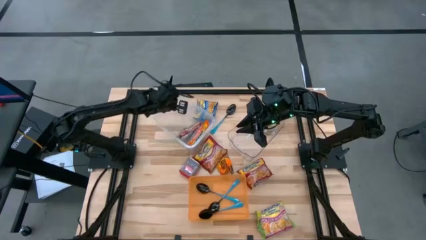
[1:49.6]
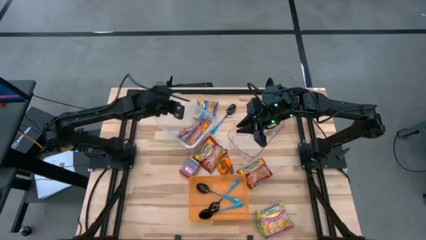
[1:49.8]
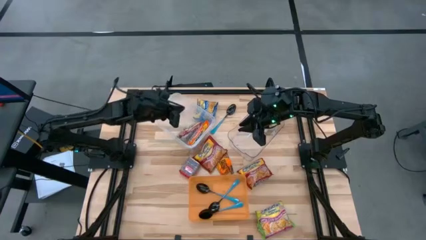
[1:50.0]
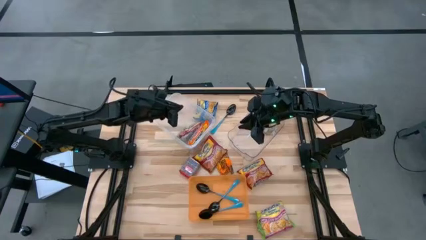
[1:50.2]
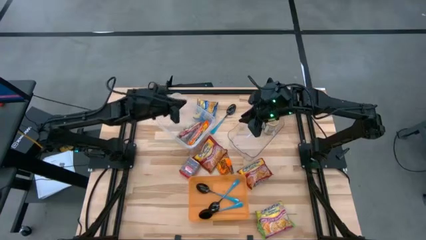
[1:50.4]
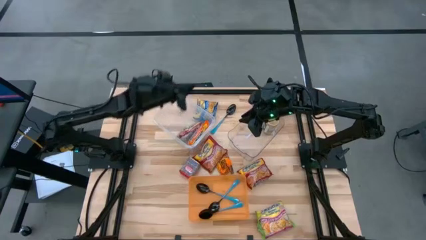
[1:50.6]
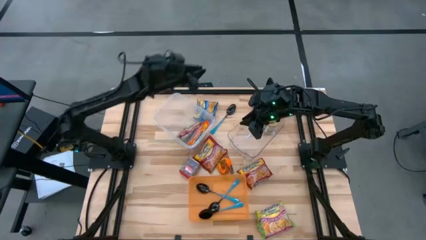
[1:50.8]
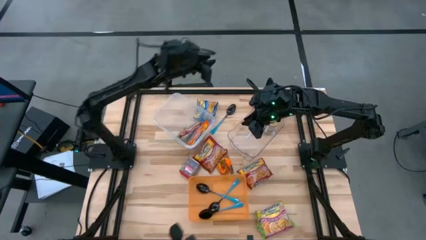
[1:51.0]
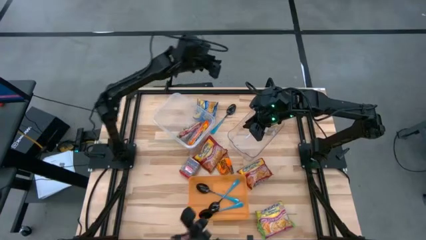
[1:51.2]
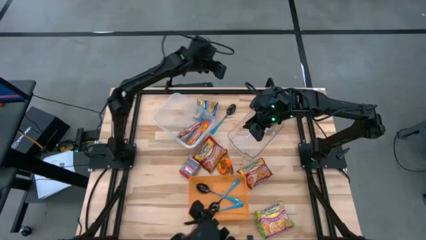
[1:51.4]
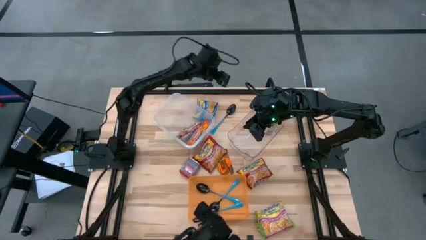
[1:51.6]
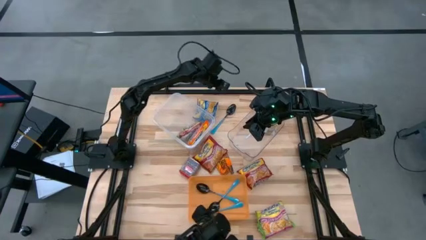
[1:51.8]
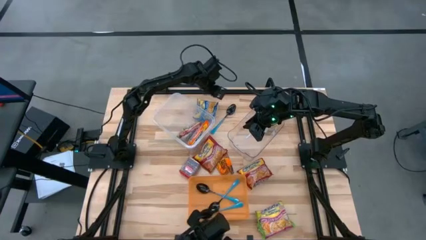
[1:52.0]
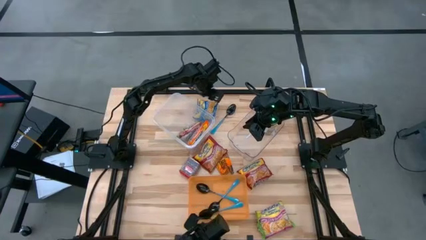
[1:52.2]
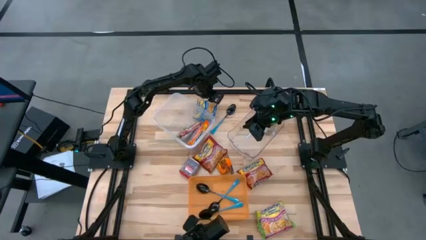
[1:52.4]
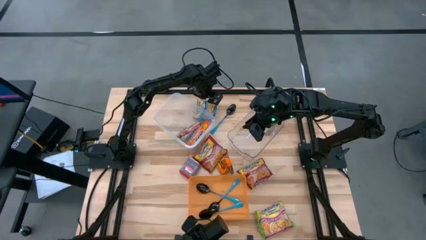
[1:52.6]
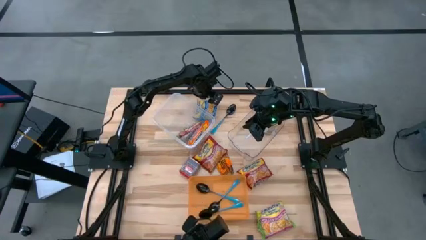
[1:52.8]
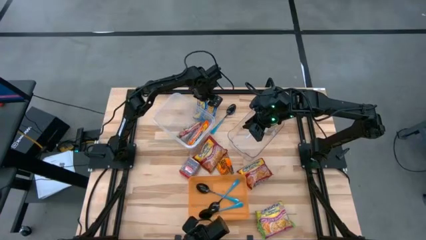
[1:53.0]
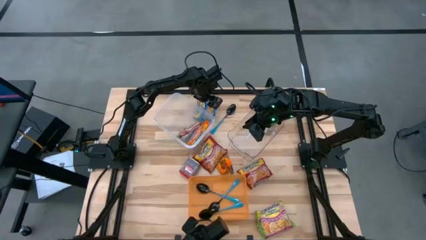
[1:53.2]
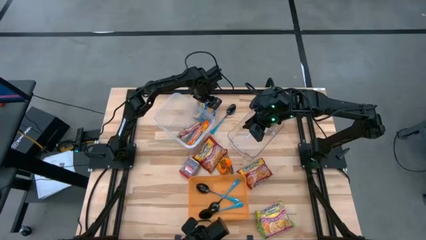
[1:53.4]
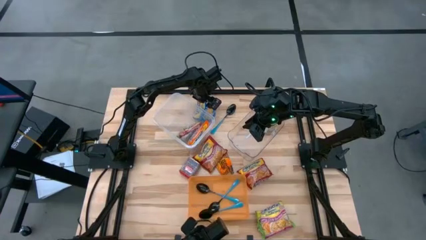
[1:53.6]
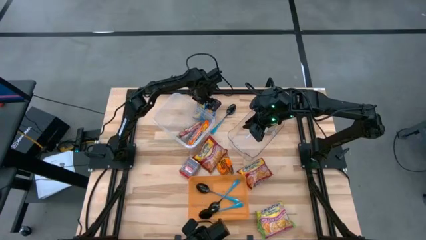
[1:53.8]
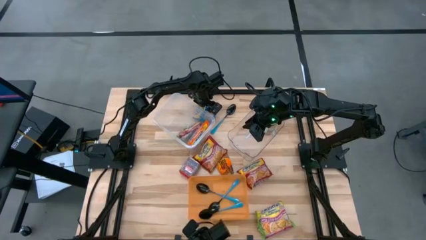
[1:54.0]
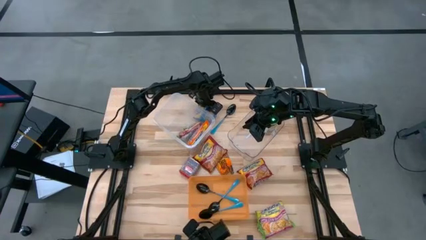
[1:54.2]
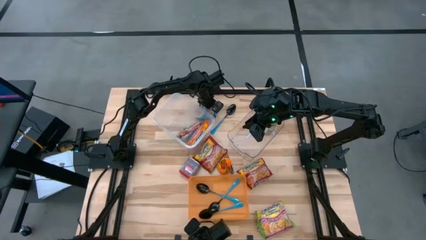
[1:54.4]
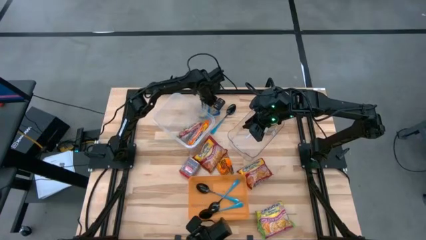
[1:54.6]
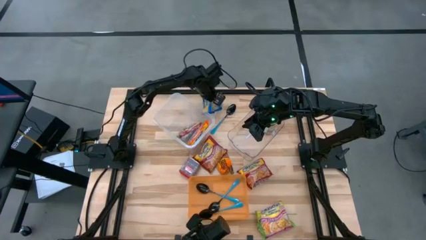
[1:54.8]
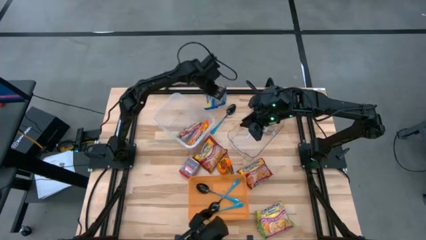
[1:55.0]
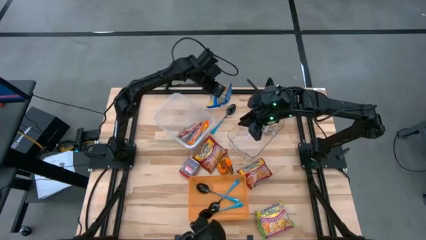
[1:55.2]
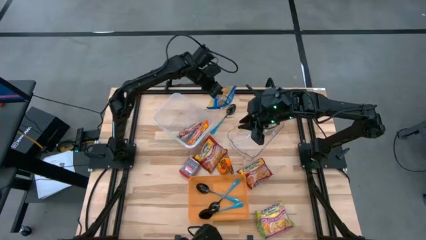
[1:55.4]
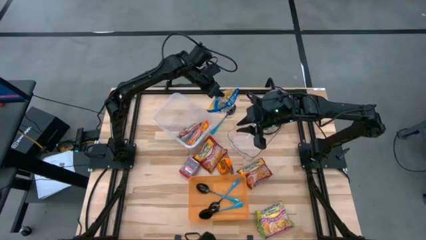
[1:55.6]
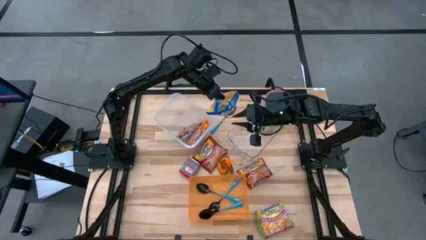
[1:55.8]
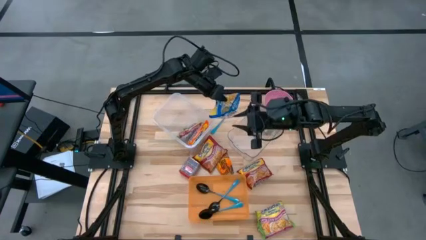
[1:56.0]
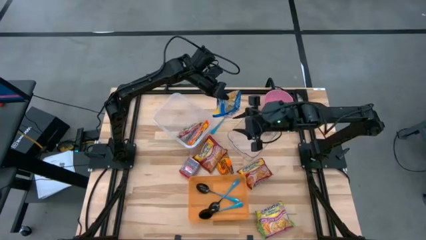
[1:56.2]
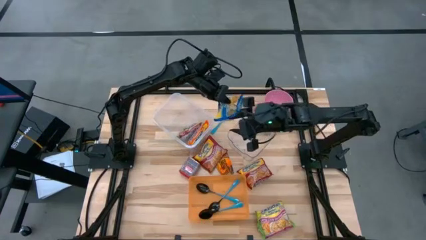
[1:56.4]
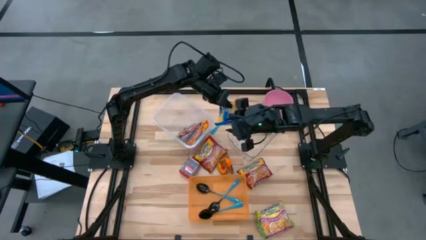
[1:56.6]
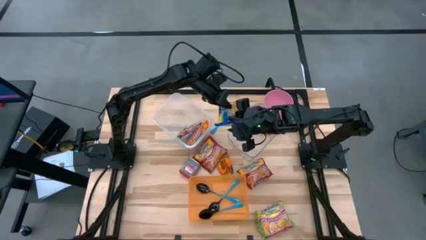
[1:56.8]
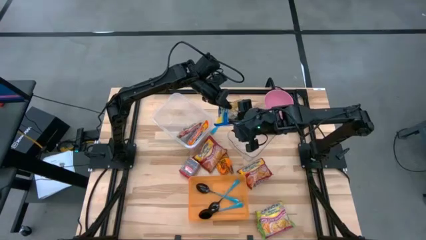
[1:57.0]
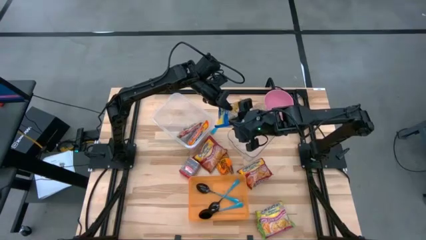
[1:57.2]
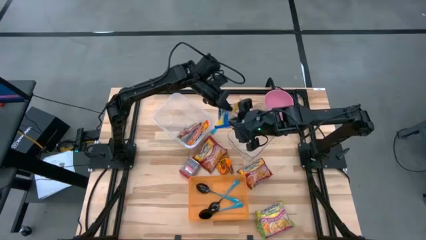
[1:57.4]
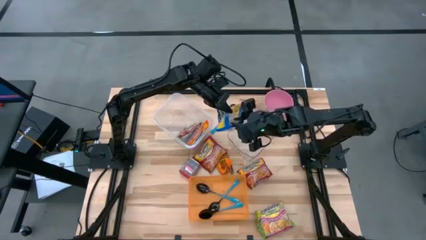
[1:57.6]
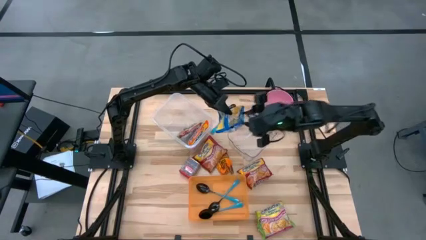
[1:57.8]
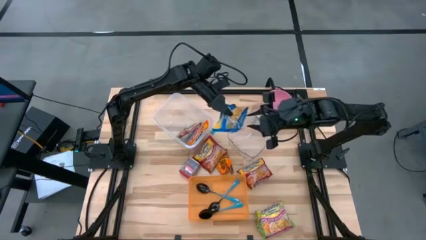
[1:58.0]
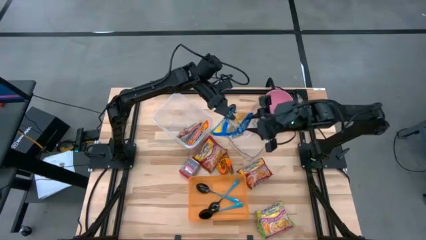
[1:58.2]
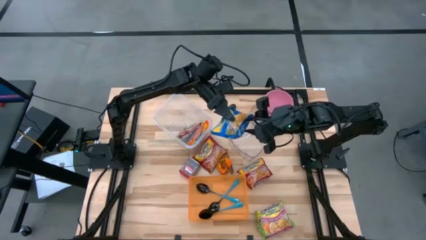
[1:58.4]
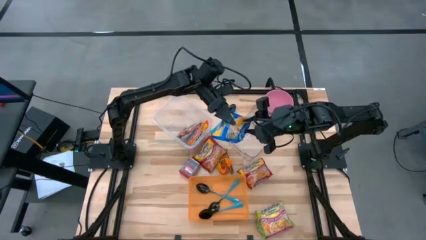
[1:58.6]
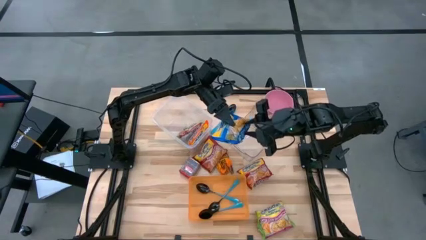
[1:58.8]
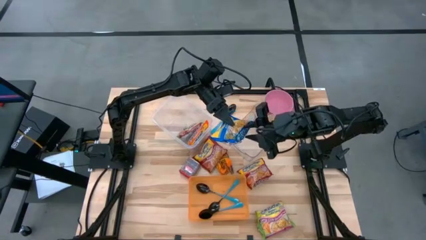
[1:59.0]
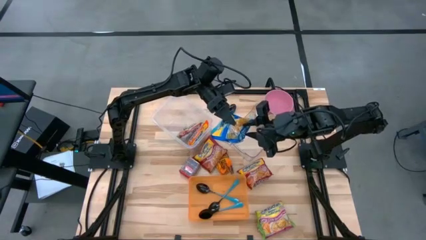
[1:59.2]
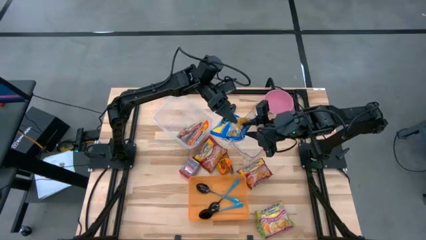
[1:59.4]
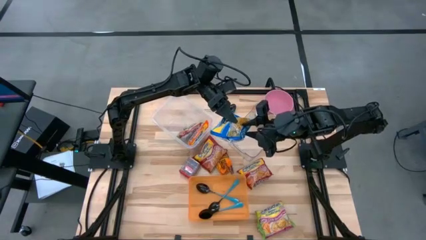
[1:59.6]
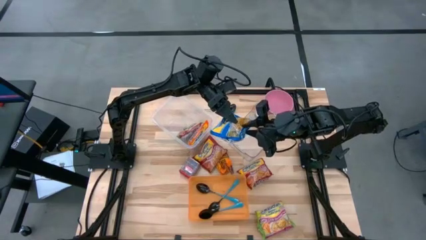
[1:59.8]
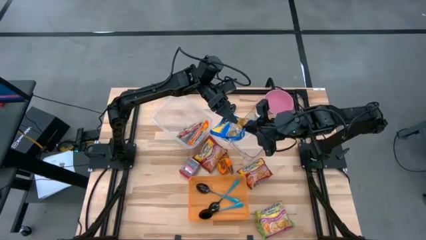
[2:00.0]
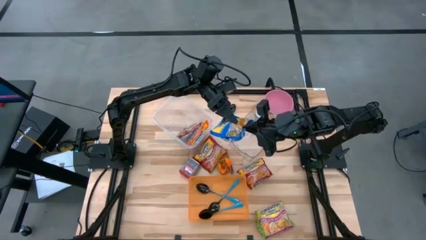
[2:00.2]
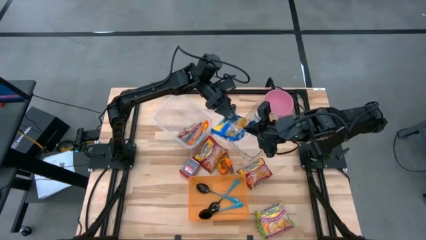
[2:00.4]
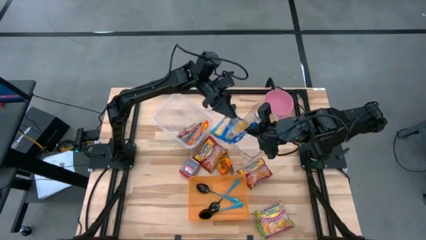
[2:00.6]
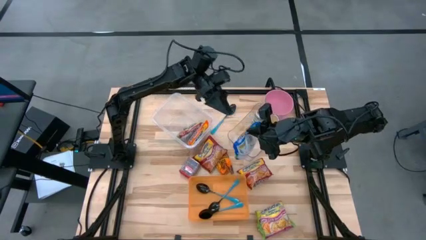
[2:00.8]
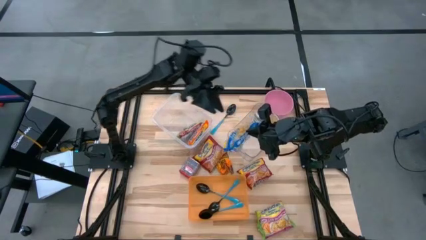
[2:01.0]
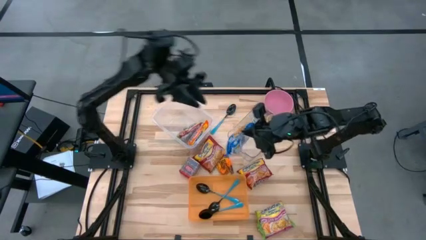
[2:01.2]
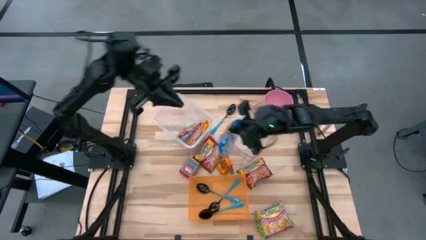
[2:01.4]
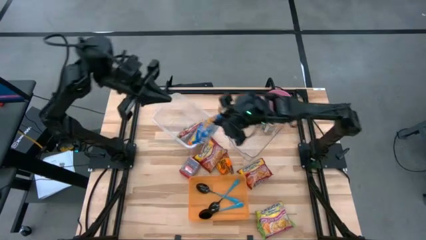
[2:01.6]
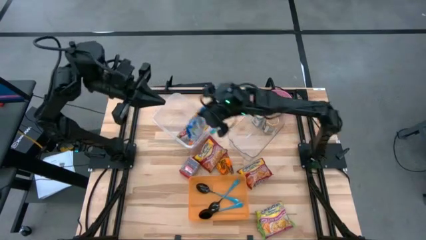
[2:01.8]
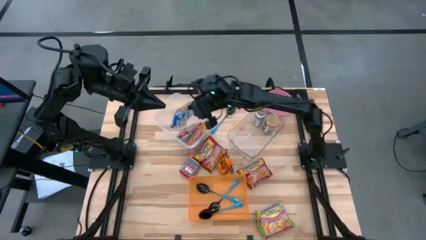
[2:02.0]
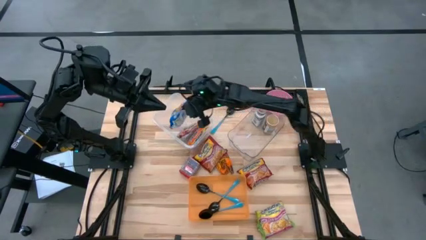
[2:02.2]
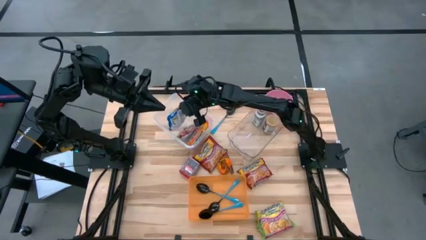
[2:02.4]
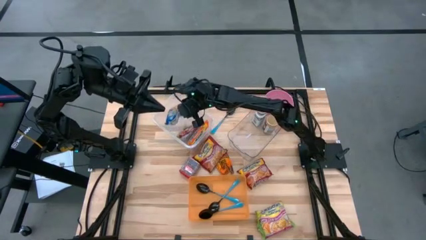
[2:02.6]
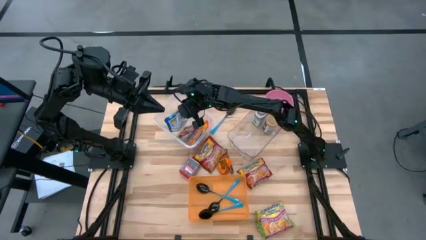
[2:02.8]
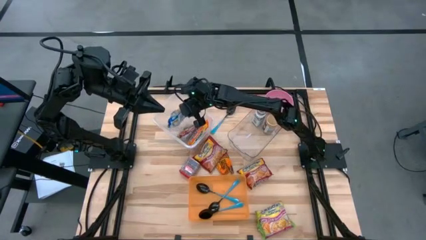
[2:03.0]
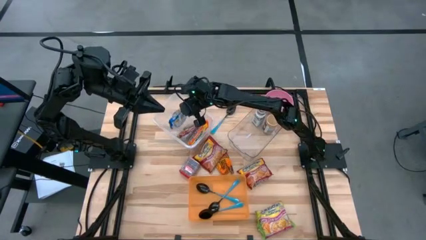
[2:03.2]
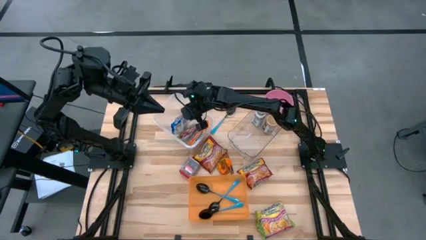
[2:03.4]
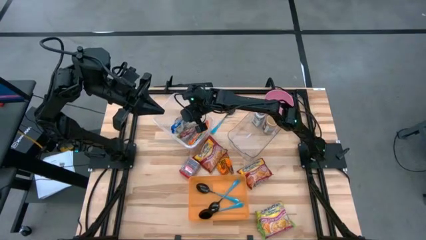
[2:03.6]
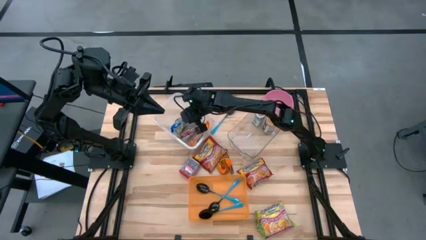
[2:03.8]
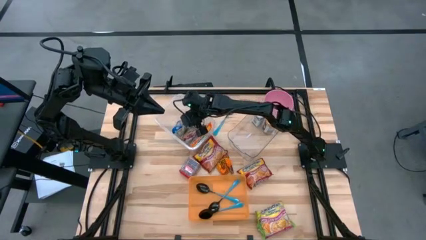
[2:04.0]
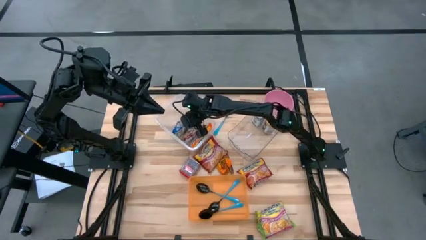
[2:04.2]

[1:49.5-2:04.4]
Task: Pick & Place Food Item
Put the blue noodle pack into the transparent container

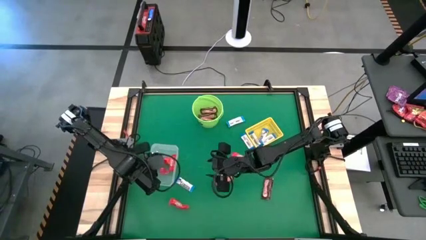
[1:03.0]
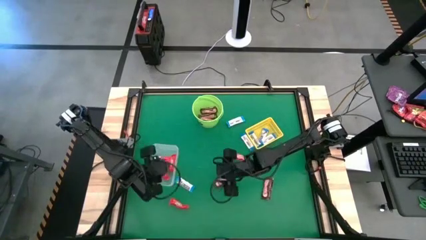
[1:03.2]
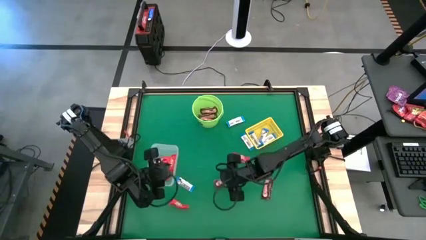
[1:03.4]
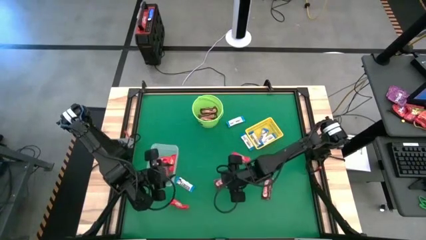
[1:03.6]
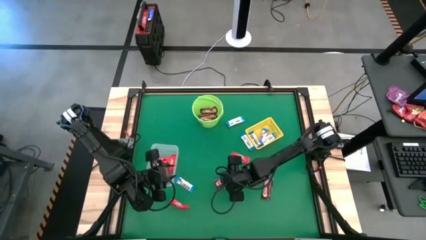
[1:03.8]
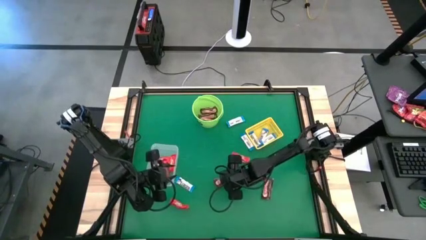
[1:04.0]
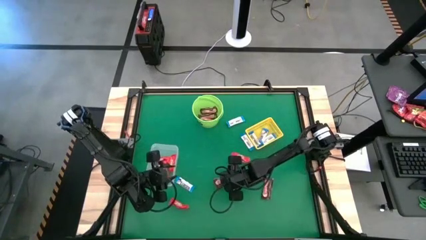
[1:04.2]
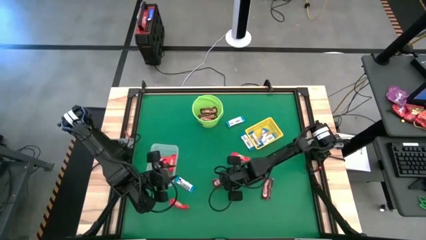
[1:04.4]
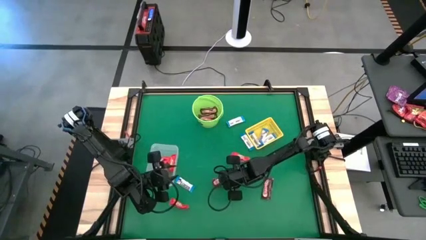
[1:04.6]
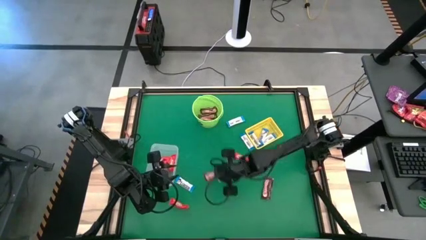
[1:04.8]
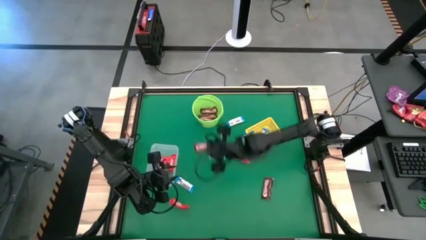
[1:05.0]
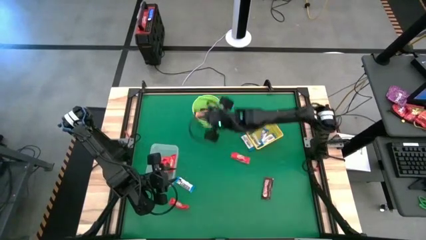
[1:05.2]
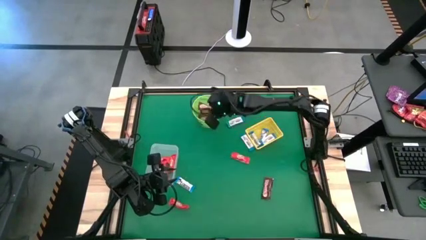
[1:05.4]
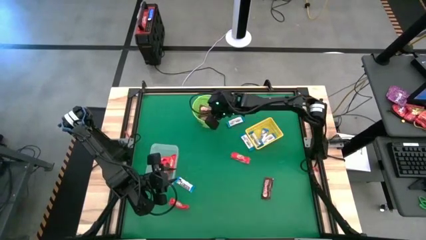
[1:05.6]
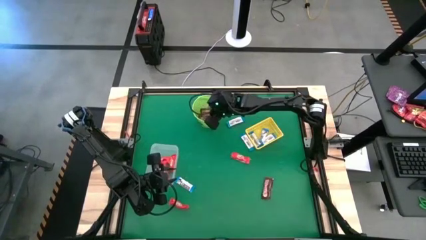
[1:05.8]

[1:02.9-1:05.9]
Task: Sort candy by brand, put in halloween buckets
Put the brown chocolate bar into the green bucket
